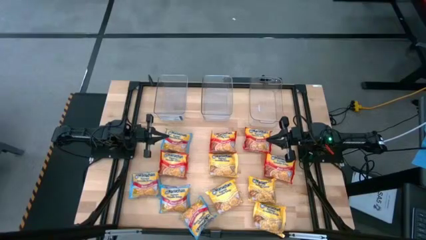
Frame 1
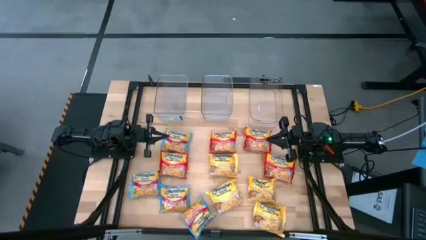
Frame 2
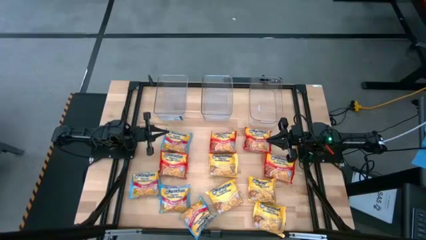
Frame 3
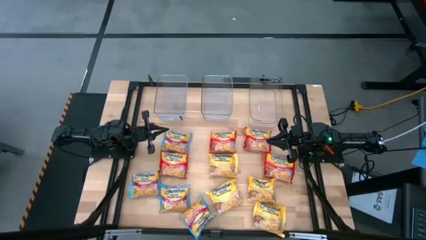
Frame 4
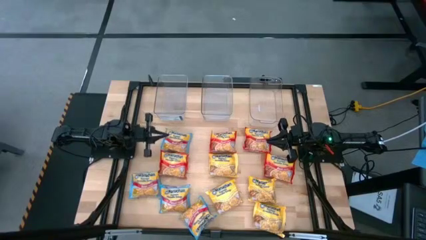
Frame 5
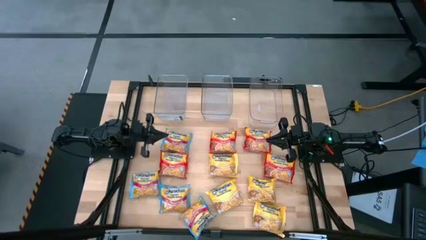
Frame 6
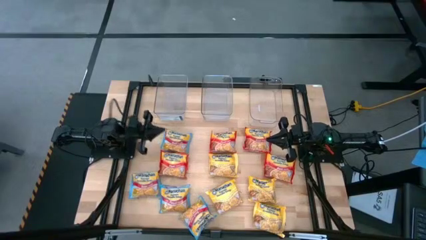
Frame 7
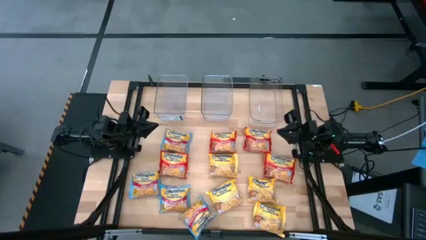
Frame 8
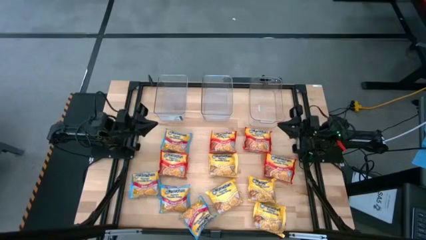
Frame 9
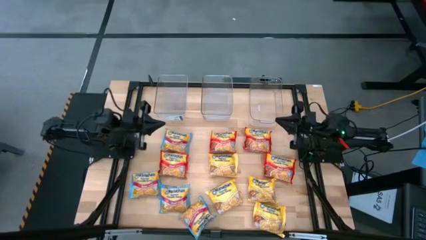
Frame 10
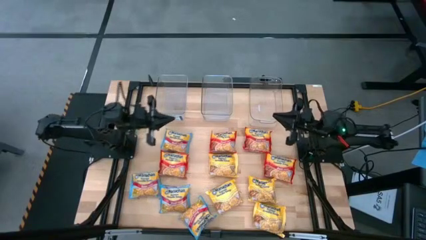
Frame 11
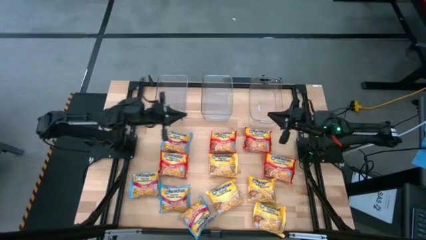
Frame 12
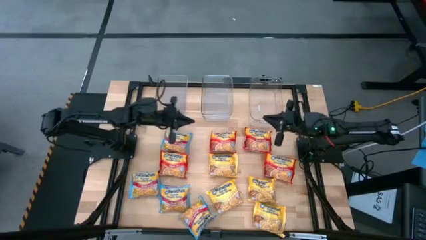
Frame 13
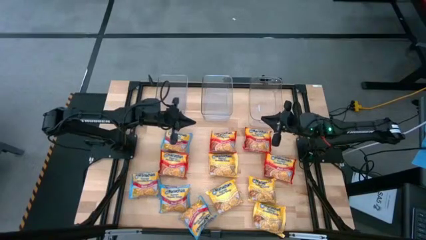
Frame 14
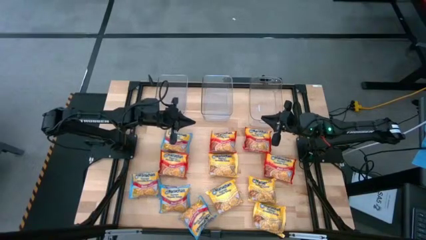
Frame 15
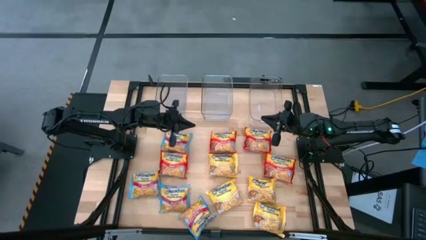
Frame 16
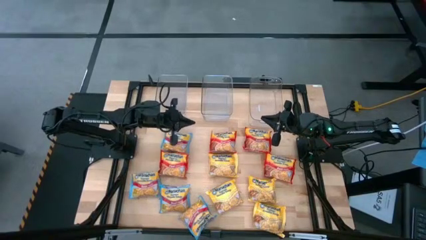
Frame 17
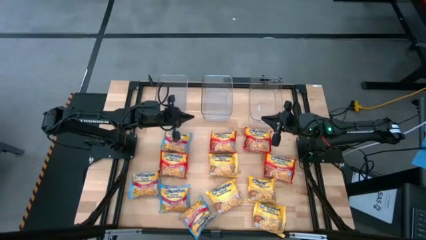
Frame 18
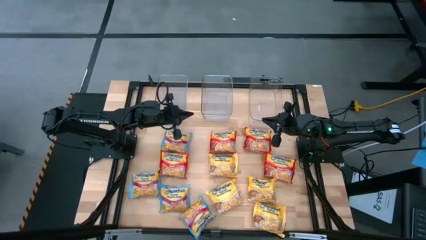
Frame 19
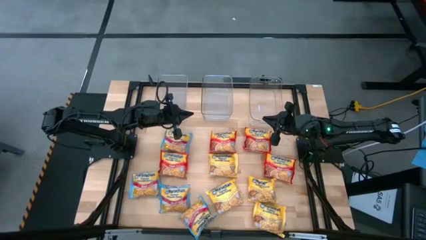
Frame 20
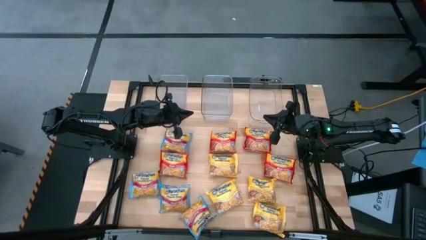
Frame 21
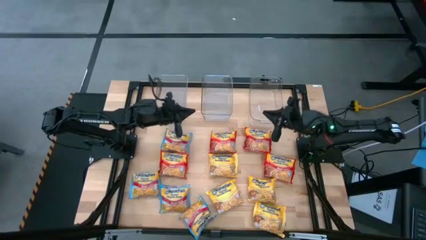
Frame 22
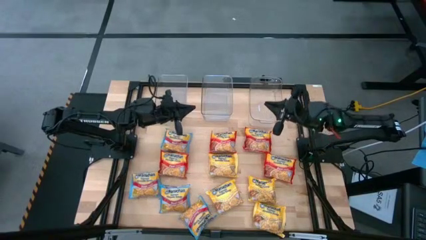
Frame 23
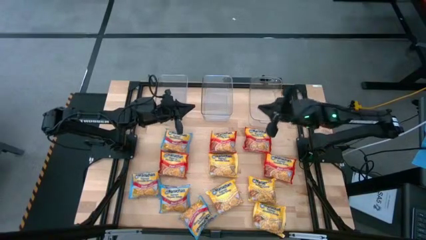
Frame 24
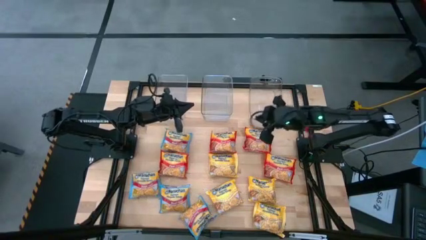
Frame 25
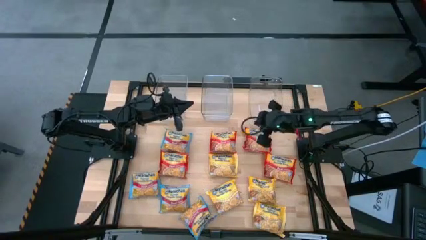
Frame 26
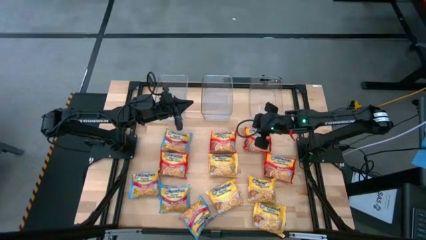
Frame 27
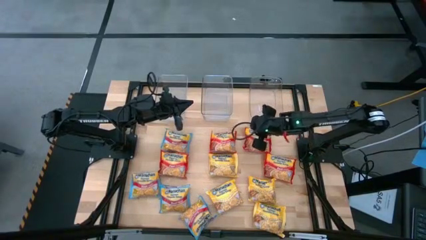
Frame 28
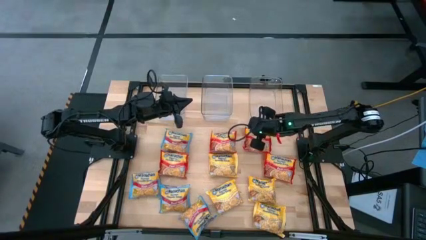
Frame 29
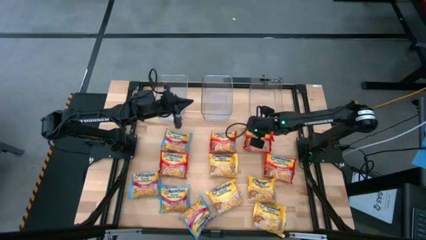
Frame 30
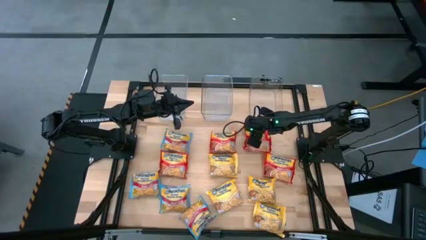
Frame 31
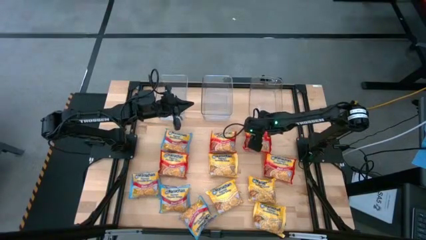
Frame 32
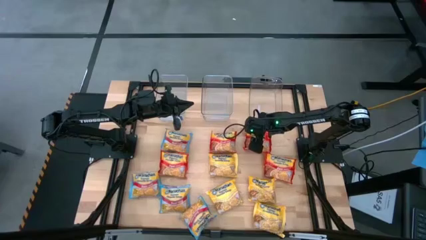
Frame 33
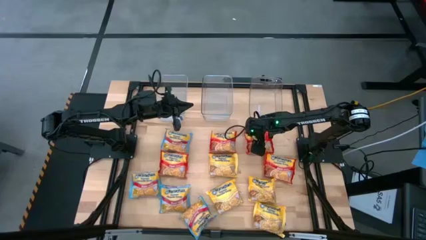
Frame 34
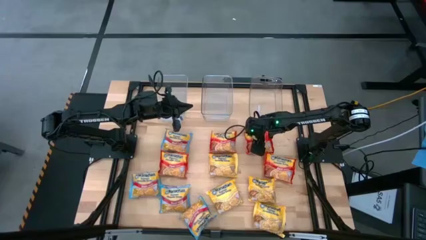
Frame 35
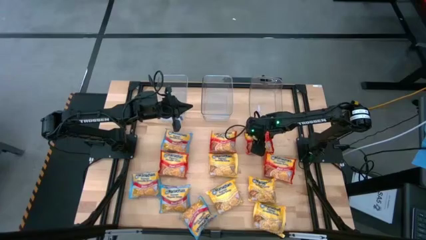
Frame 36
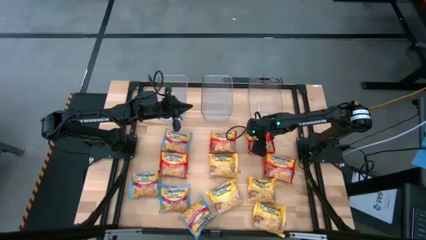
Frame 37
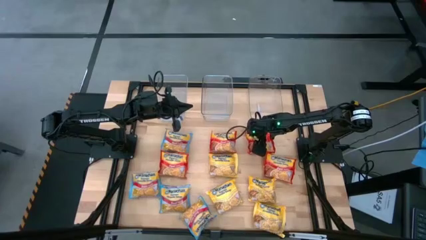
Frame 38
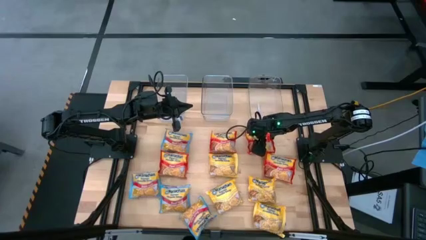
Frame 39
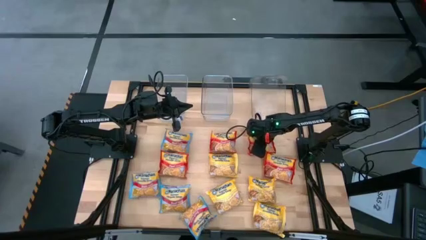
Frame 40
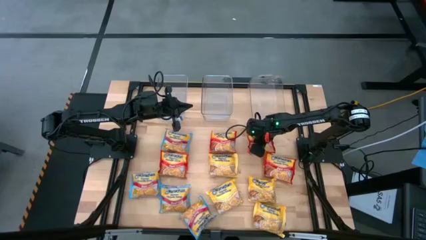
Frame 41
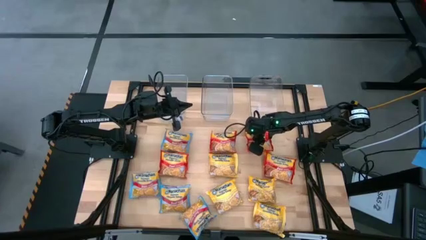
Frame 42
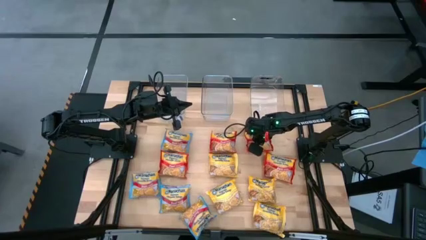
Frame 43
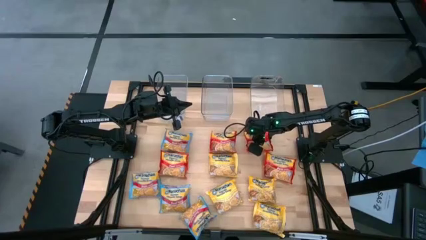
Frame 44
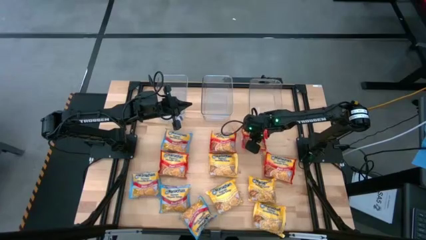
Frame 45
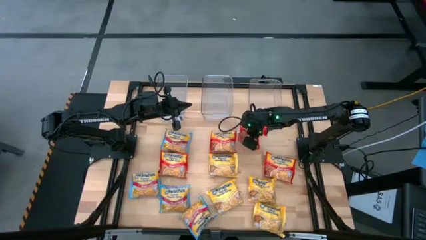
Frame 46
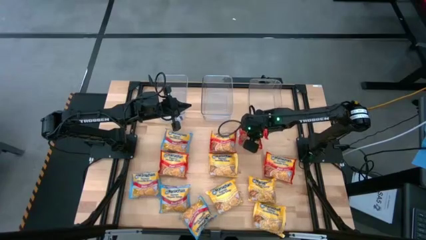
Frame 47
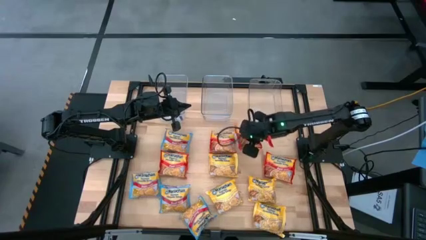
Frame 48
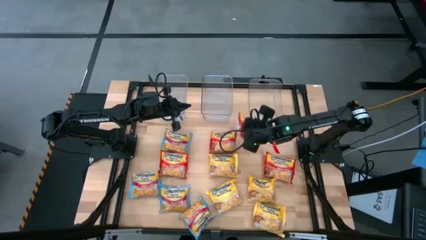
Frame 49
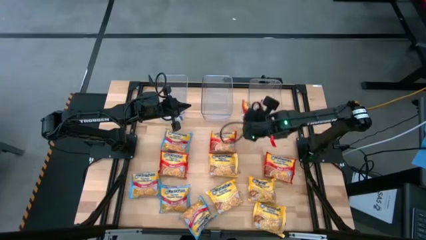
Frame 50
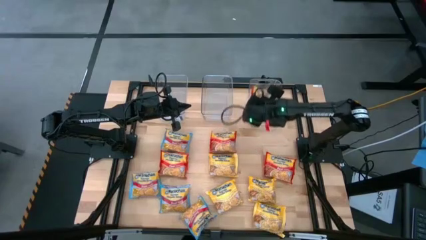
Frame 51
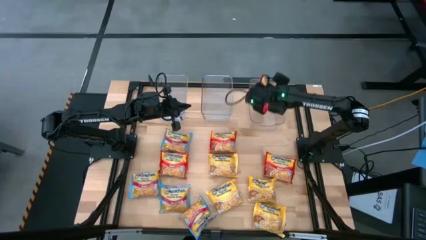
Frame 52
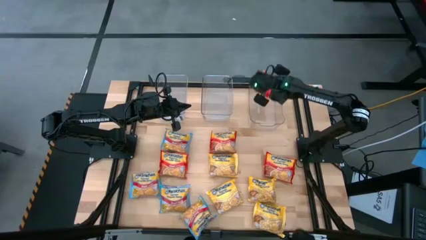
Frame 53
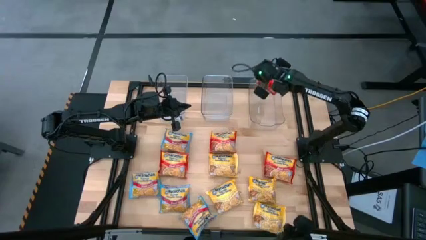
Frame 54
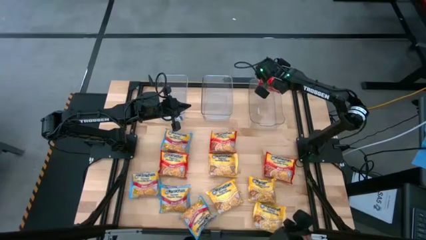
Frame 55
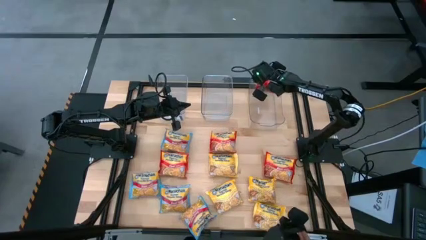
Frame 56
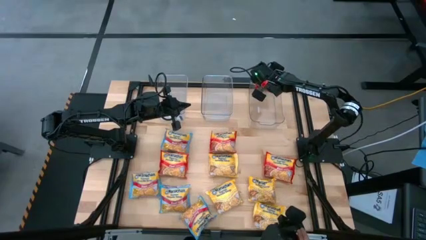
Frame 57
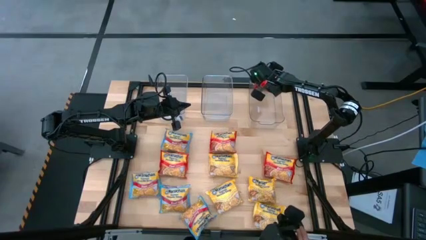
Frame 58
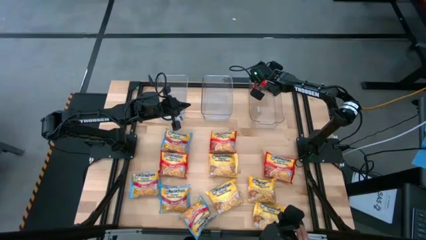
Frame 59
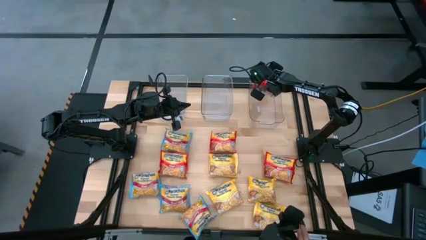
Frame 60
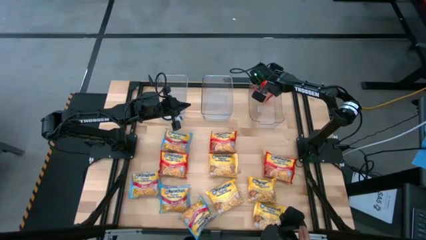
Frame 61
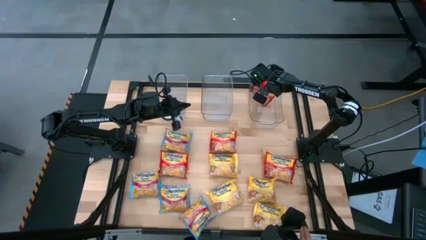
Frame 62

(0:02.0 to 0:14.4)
Task: Sort Maruchan noodles
Put the red noodle pack into the right transparent bin

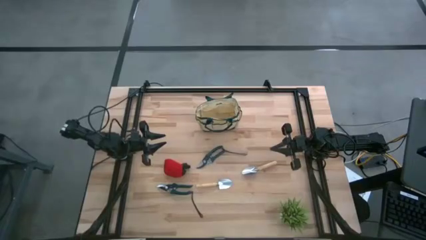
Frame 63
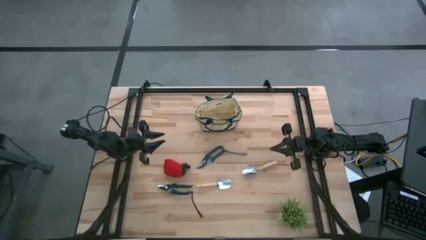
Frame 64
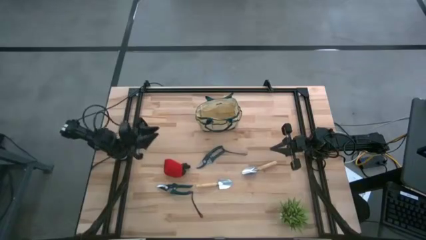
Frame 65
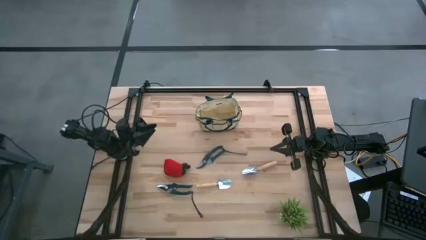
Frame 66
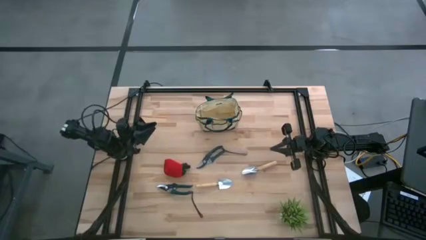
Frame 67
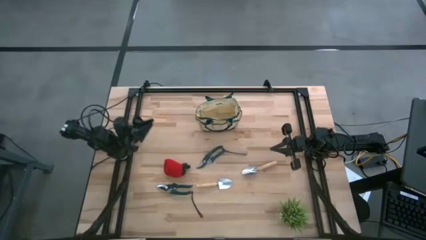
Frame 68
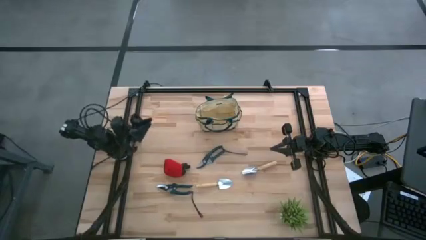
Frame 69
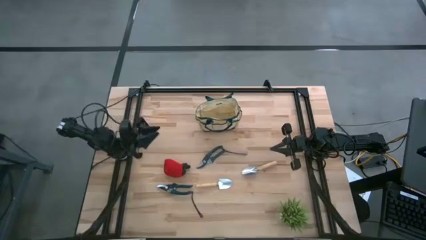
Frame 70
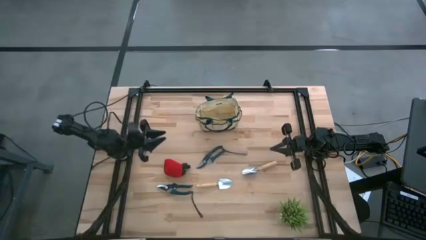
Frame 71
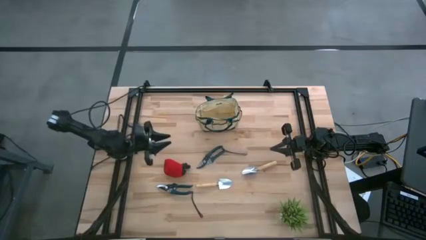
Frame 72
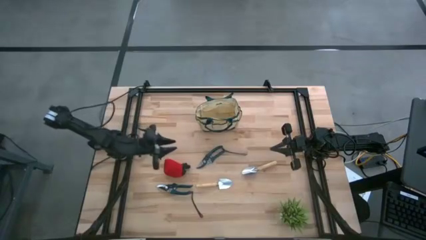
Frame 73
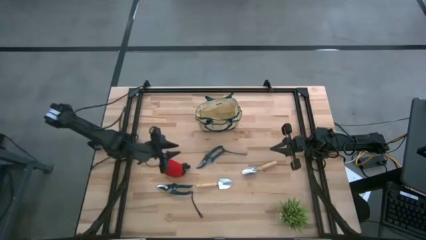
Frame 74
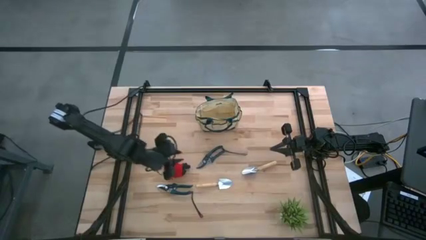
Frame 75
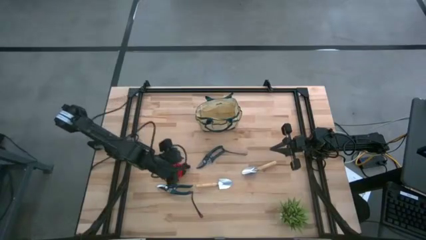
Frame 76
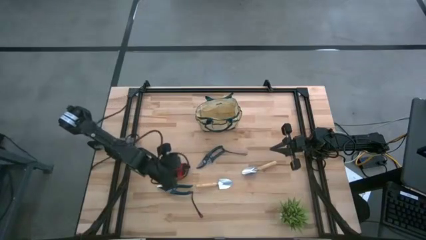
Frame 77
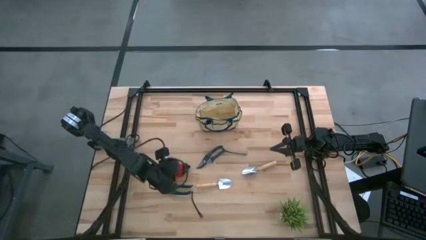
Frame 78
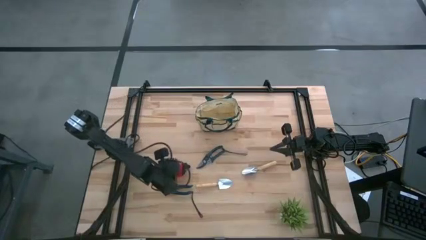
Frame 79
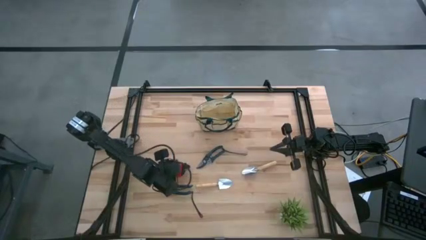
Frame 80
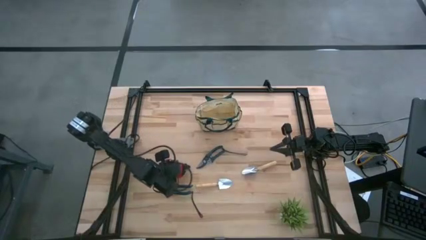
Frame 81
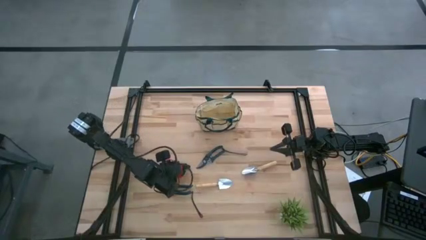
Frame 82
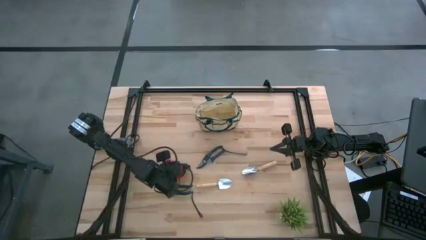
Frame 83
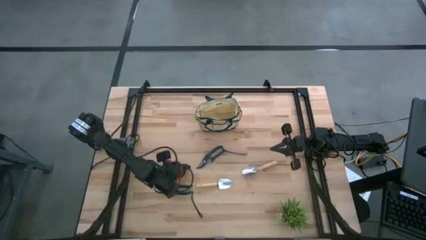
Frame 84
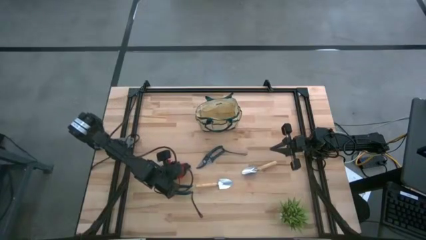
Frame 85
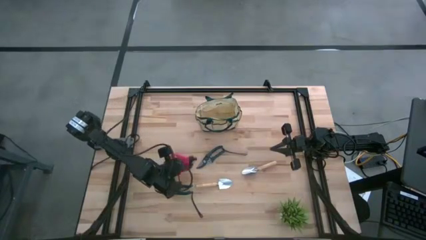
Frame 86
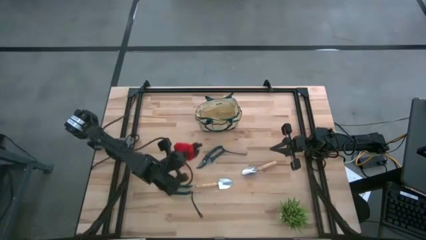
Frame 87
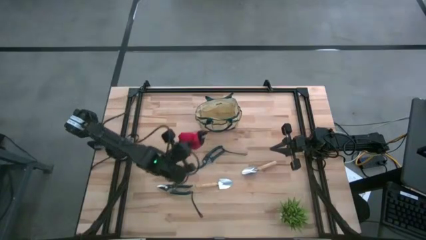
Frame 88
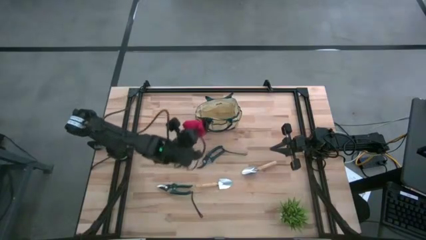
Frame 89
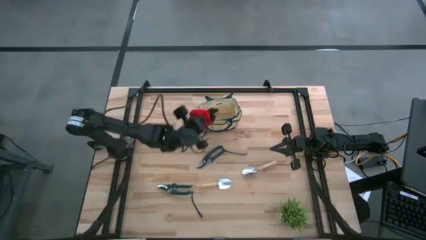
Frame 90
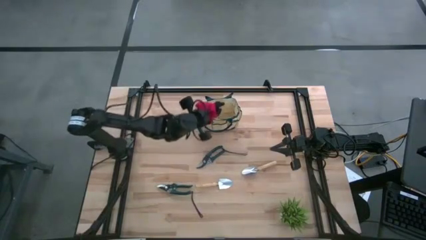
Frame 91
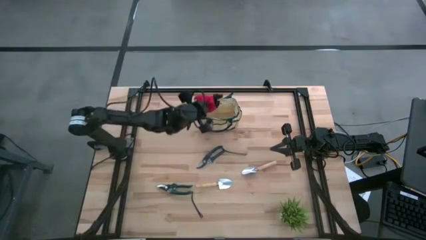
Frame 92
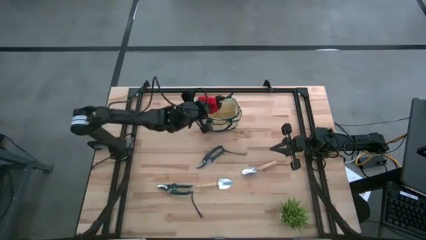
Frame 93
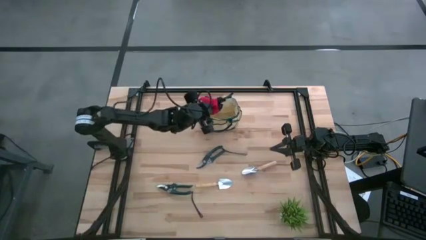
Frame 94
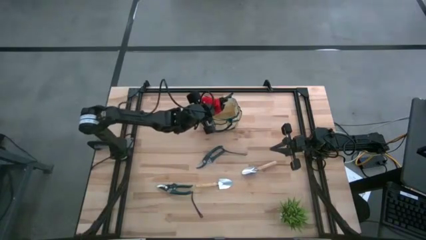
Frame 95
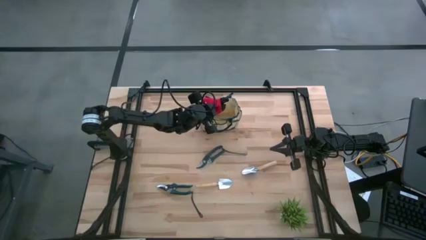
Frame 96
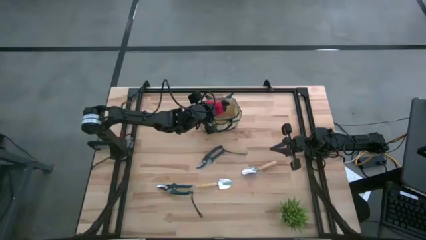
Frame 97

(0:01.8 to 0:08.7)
Task: Pick & Place Garden tools in Gardening bag
Put the gloves into the gardening bag
